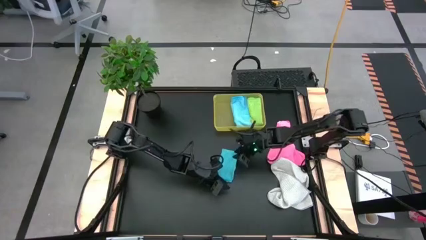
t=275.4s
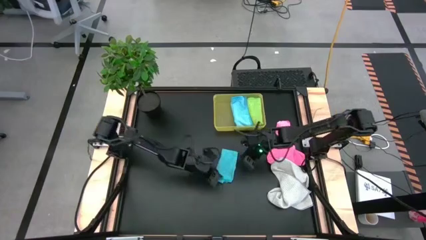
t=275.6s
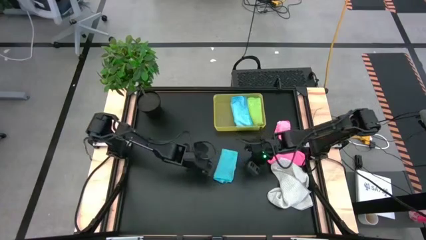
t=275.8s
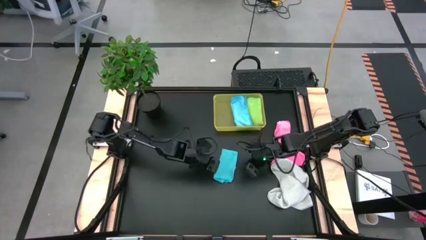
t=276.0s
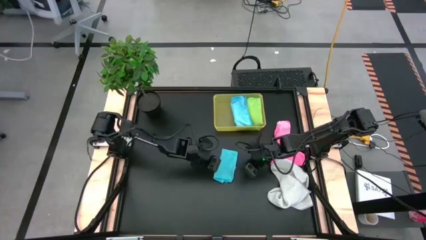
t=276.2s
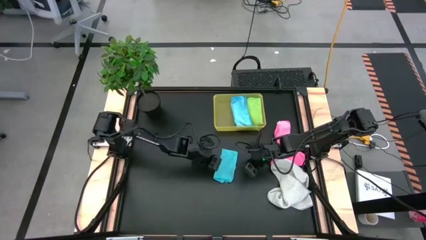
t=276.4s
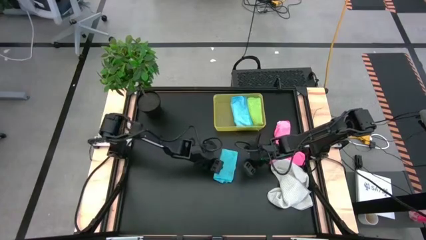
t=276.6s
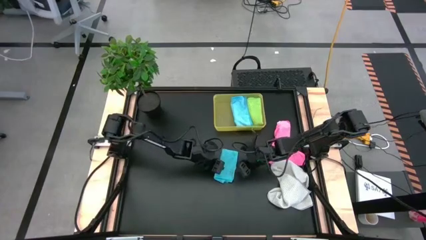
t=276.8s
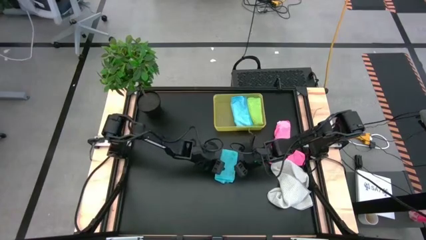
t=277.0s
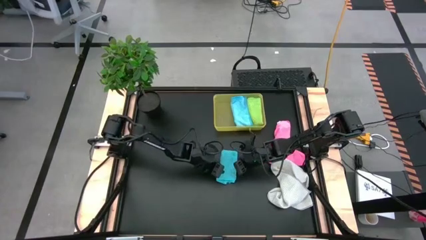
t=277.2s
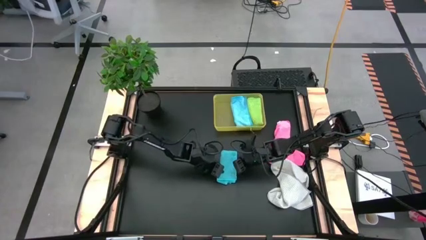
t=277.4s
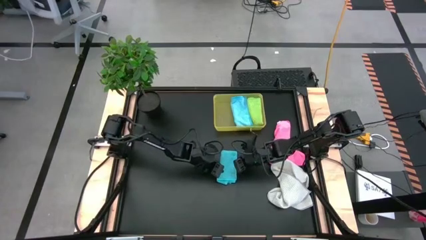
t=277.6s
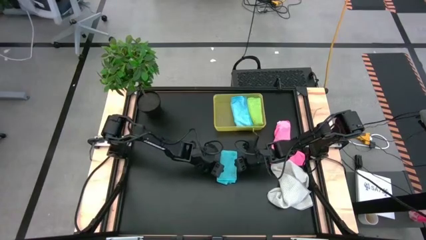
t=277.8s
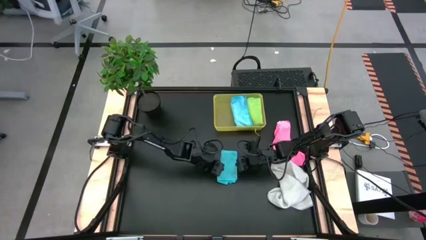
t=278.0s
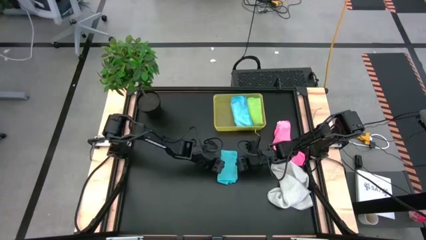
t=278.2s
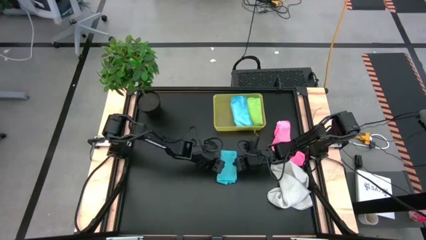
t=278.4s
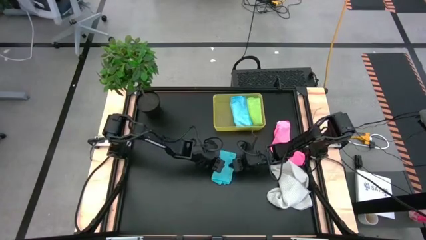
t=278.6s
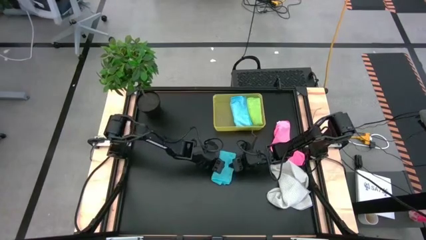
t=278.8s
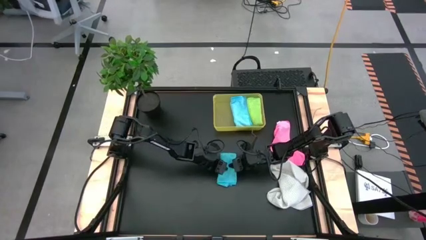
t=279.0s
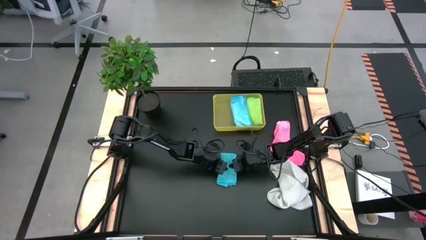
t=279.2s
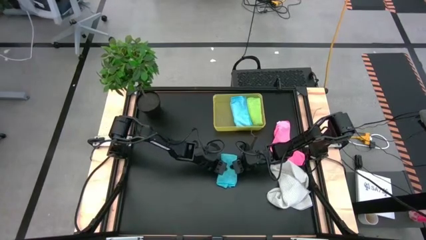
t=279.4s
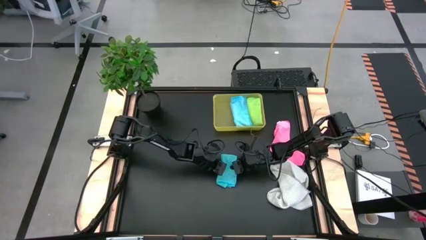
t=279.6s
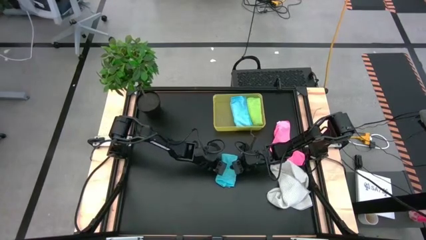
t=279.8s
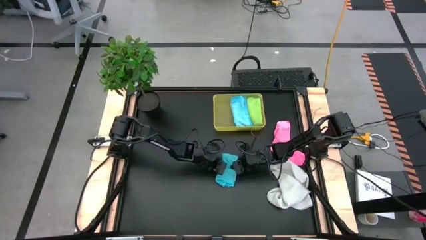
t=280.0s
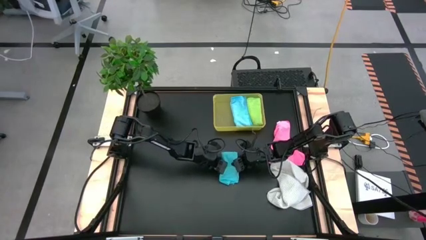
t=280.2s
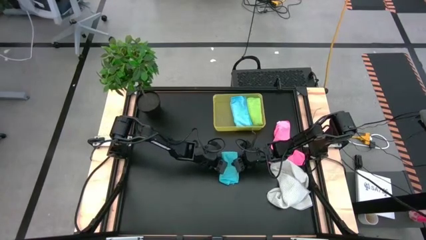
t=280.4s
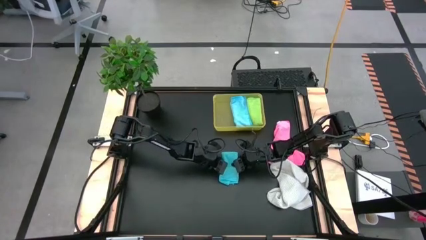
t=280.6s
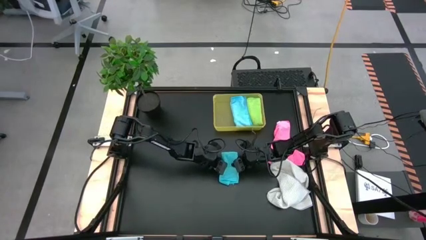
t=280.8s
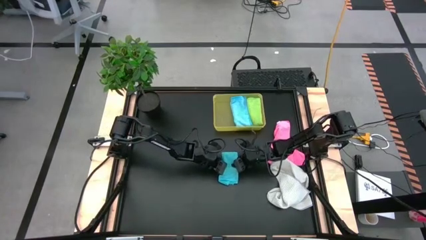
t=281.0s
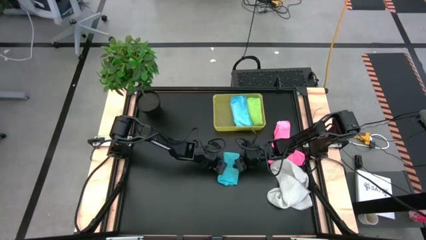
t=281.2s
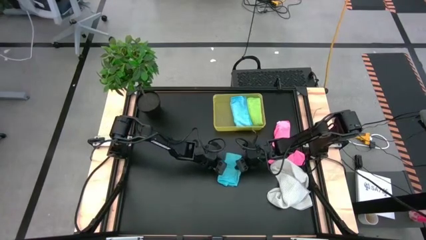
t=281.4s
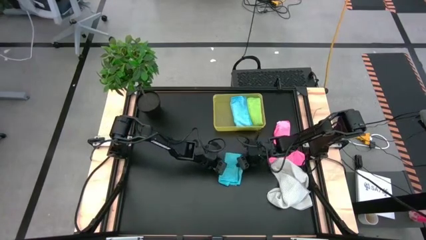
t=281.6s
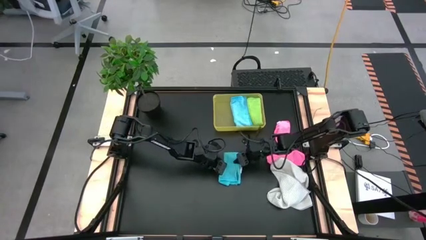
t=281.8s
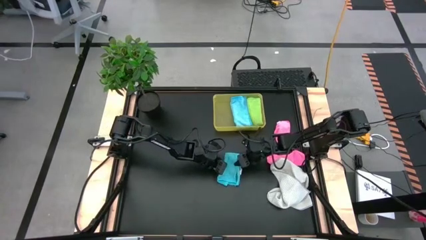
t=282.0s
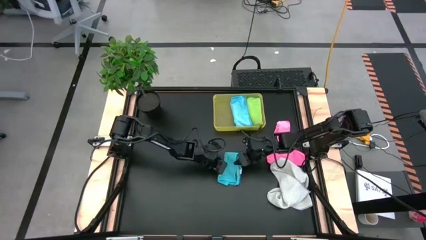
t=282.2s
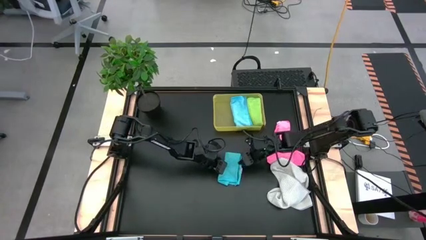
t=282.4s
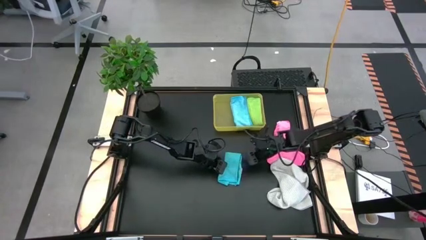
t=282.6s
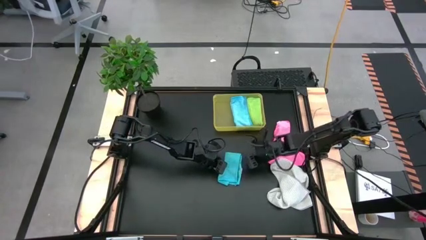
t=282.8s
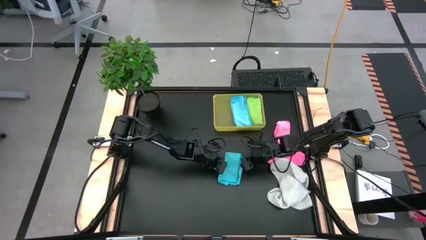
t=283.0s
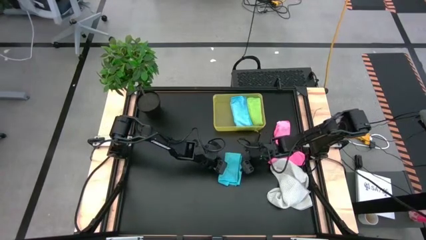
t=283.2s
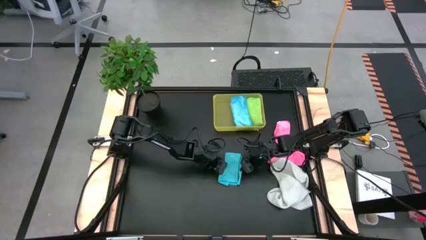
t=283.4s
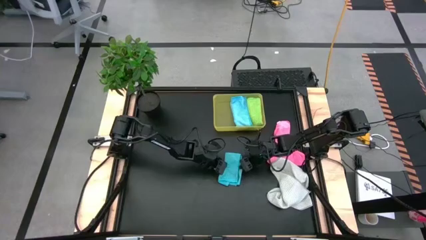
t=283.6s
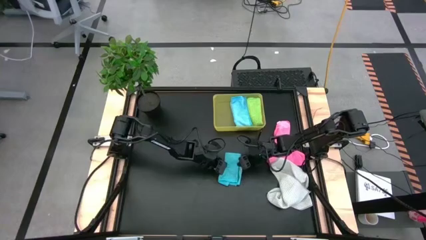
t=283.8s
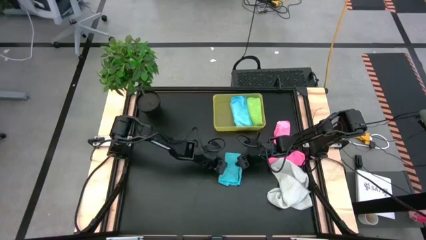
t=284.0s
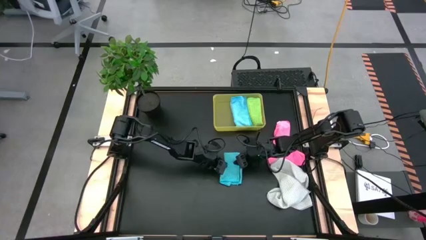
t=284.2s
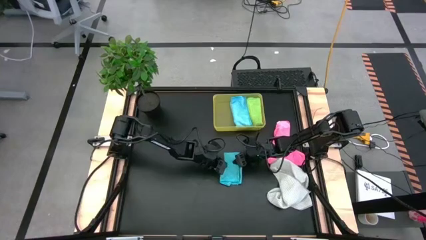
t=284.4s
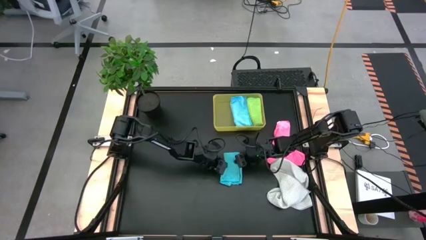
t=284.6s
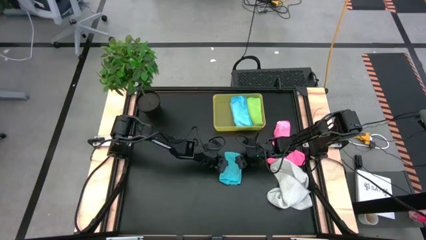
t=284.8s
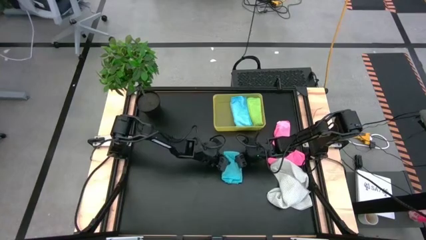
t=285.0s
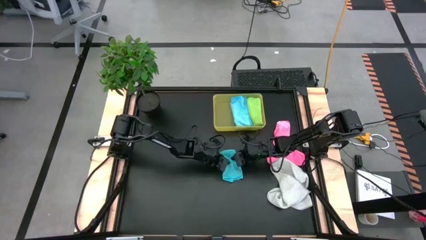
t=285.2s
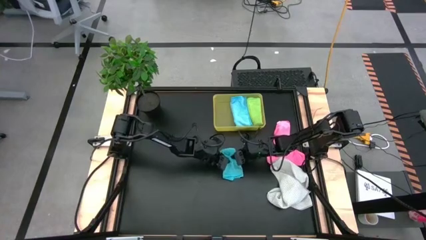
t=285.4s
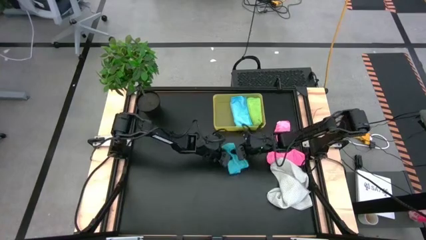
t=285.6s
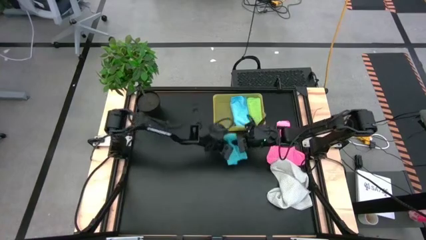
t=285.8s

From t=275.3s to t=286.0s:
Task: Fold microfiber towels
Put the blue microfiber cloth into the bin

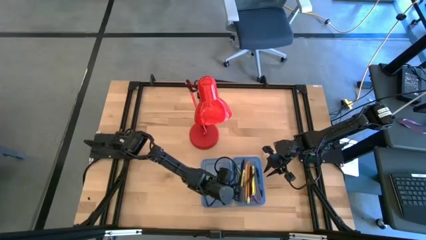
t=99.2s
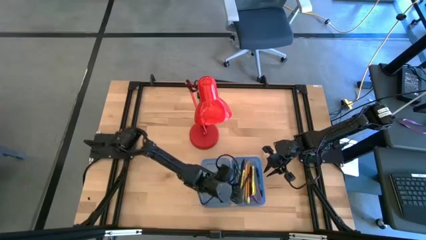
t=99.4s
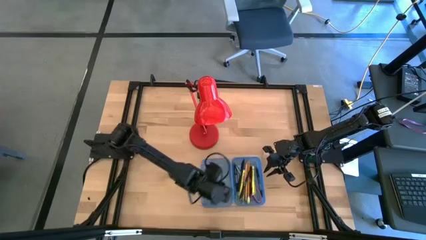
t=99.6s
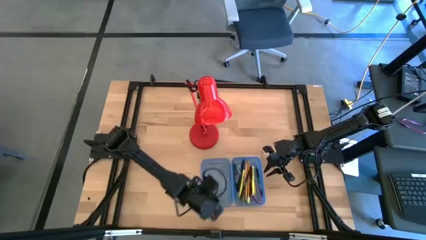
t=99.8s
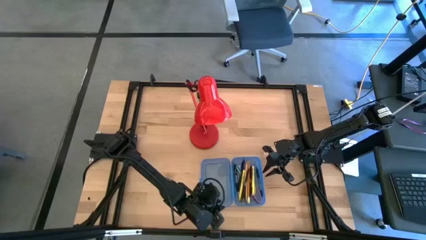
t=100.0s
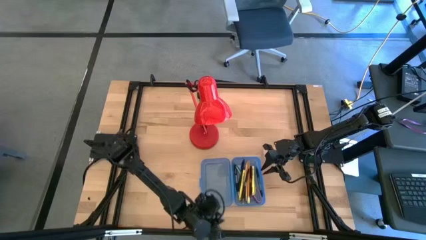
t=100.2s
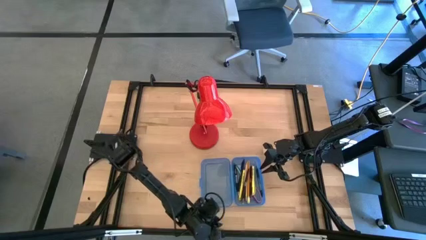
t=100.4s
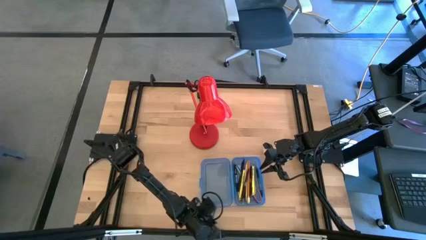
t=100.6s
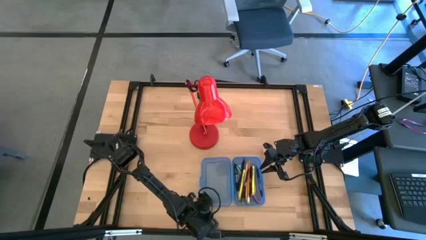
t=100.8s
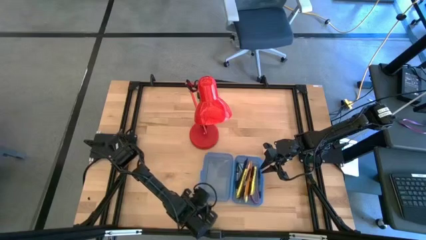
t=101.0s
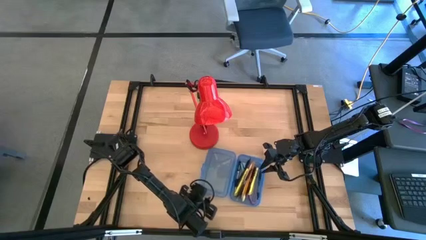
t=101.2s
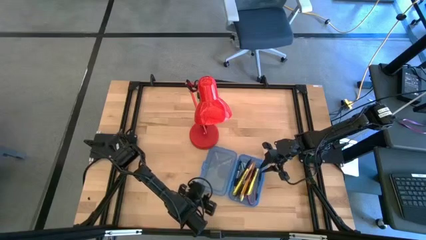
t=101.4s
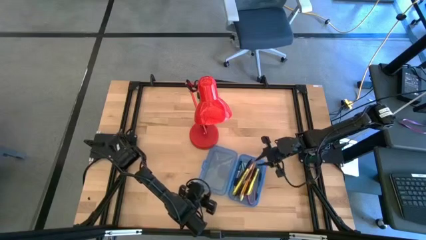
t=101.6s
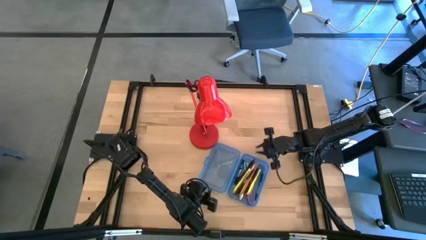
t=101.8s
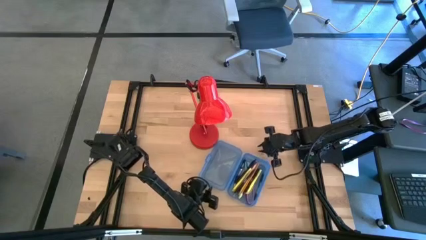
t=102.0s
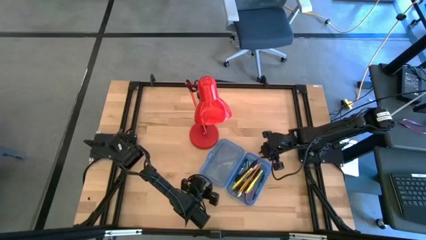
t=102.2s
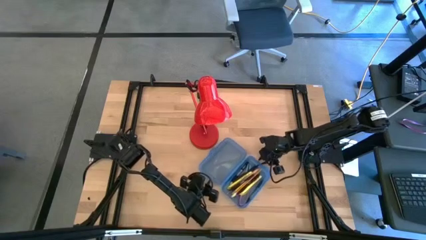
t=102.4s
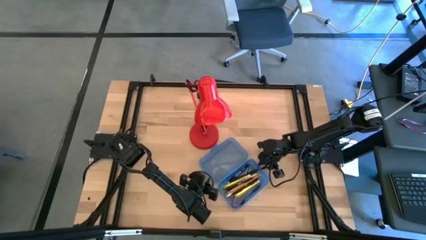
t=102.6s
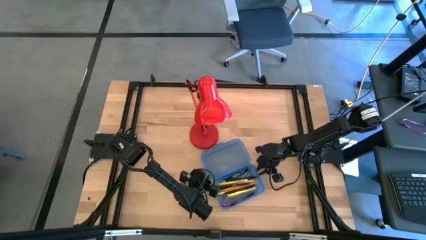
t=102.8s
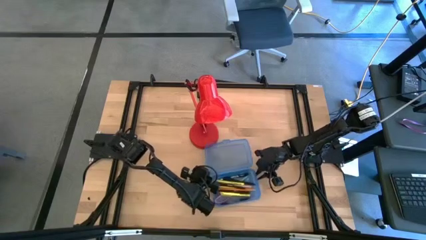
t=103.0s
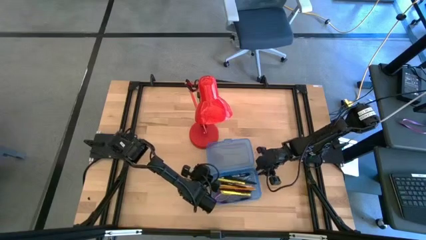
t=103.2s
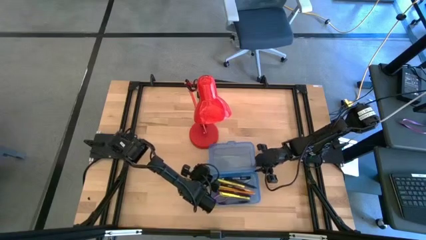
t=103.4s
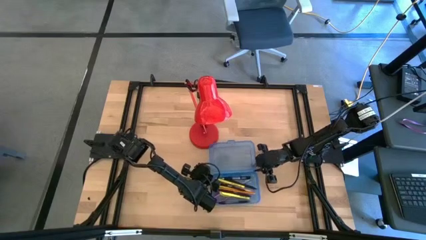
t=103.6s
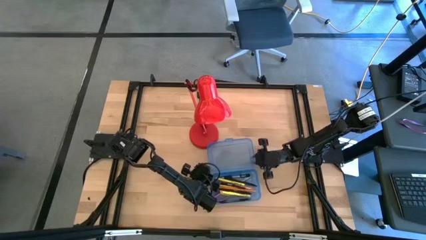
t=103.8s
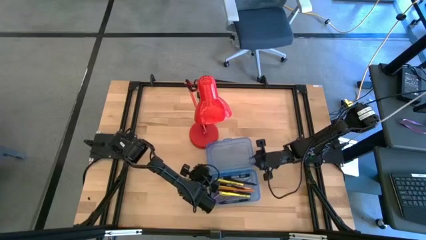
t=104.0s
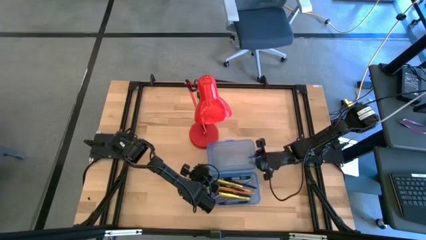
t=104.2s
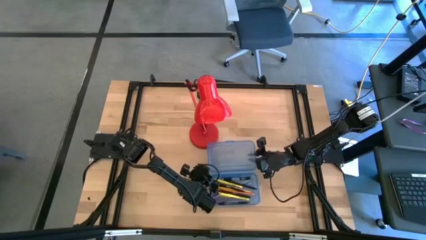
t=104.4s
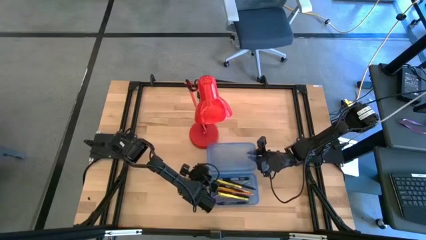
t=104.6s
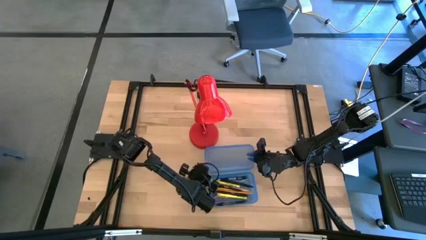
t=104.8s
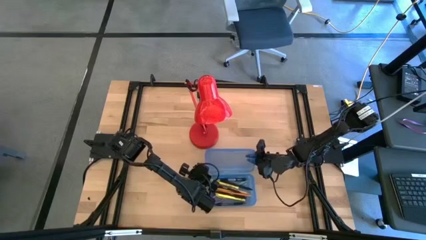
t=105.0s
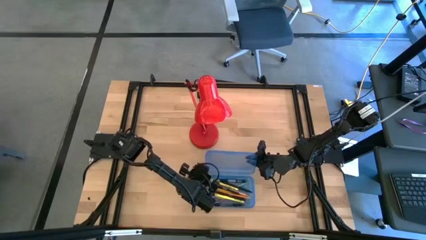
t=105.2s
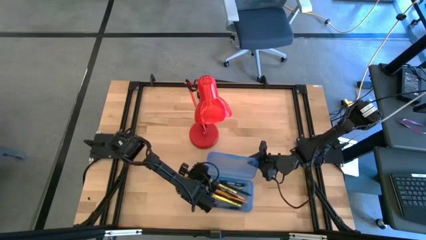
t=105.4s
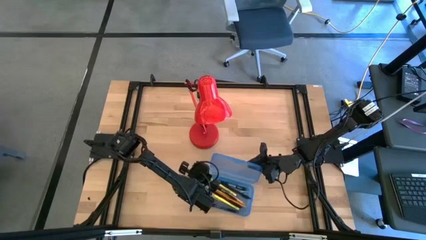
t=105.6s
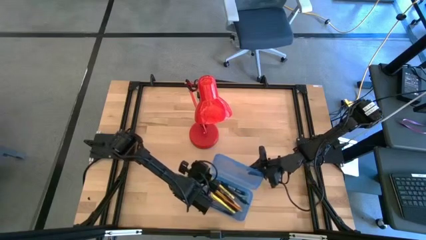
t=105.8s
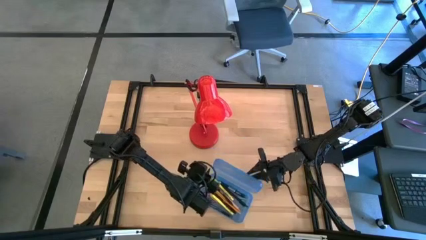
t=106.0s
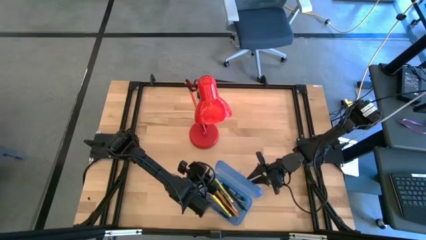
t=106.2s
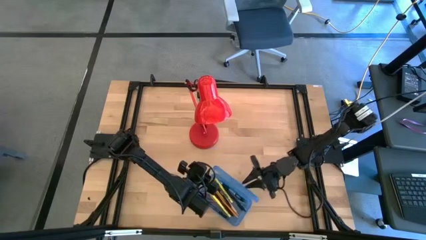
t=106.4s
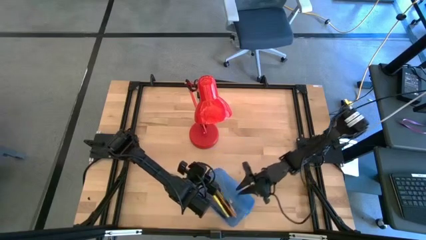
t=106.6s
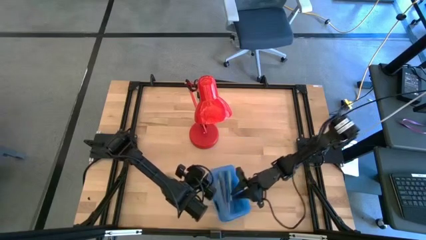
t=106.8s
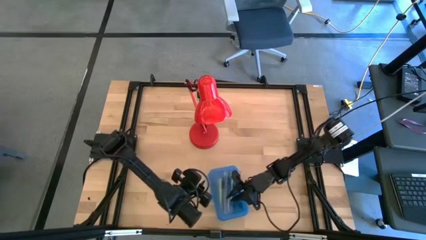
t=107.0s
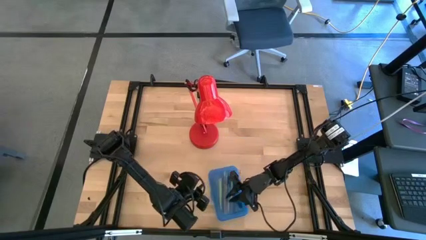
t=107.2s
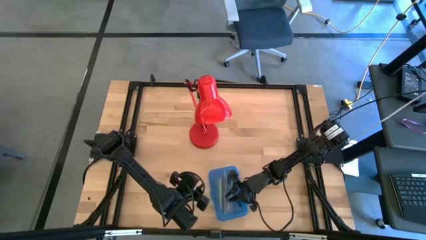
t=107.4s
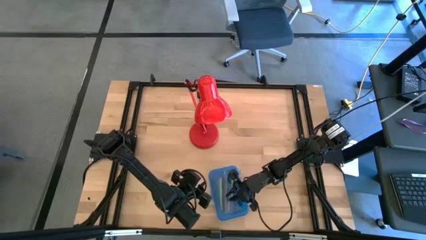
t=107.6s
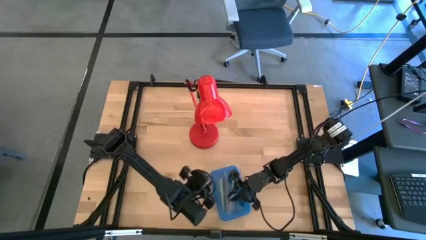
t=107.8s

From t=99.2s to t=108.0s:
Task: Pick & place school supplies into a supply box
Close the blue supply box
